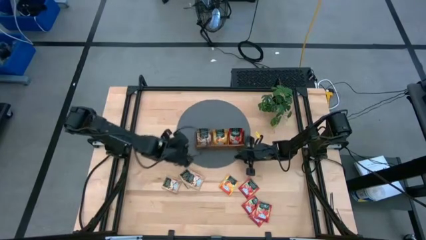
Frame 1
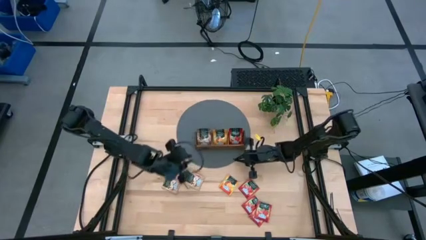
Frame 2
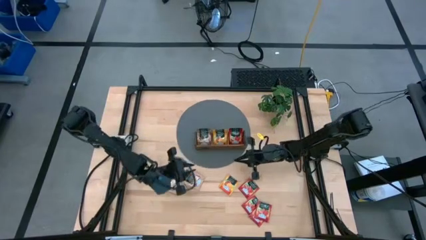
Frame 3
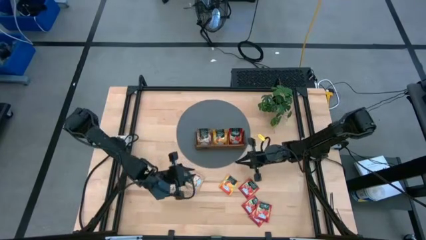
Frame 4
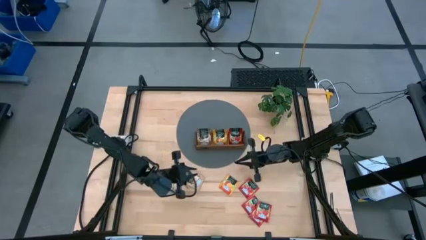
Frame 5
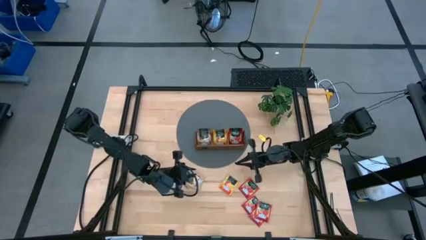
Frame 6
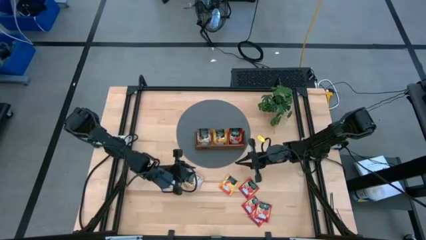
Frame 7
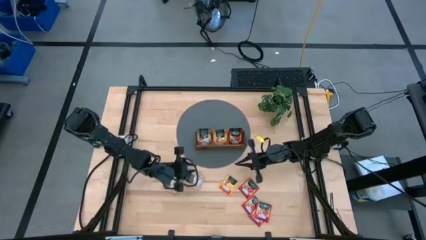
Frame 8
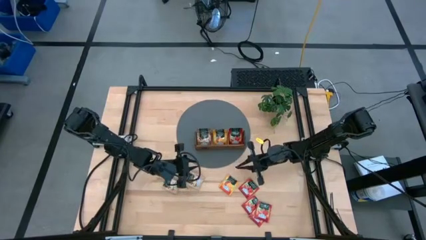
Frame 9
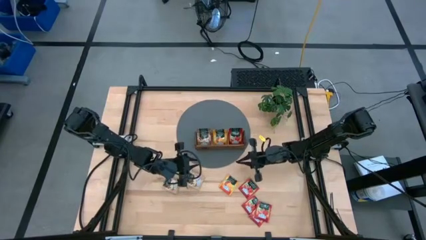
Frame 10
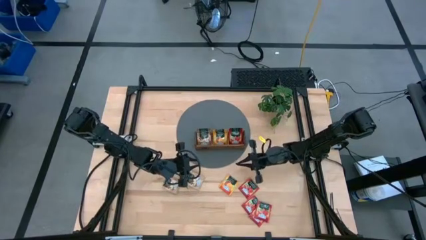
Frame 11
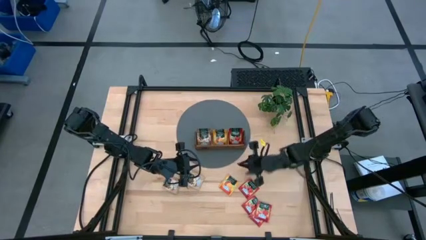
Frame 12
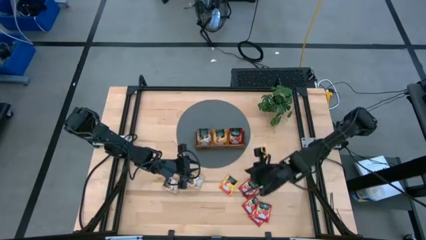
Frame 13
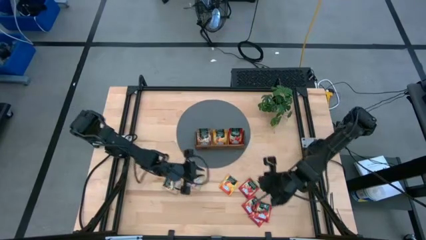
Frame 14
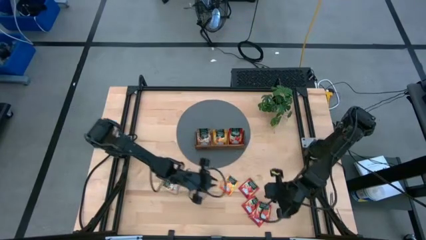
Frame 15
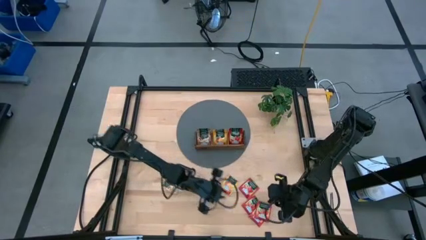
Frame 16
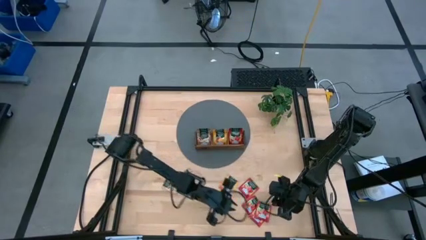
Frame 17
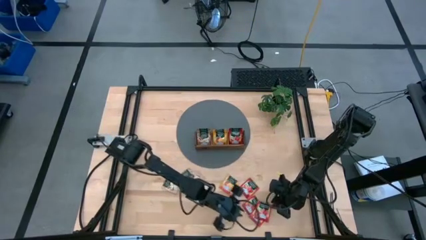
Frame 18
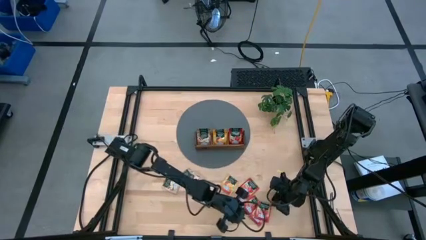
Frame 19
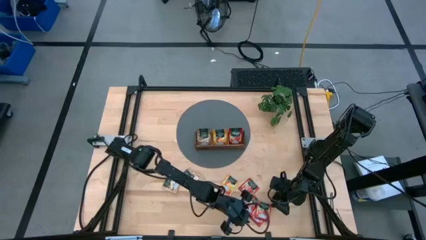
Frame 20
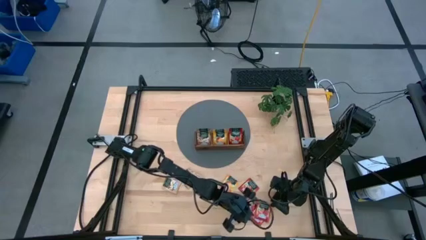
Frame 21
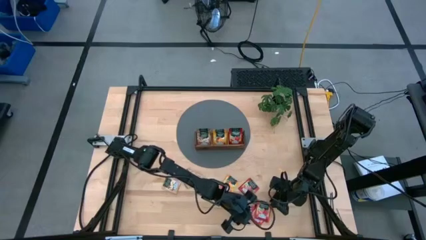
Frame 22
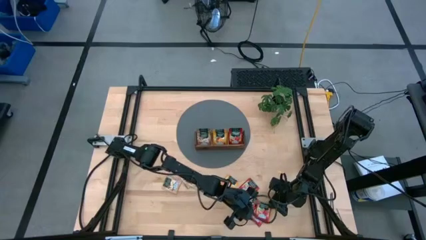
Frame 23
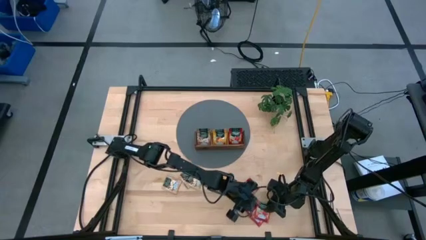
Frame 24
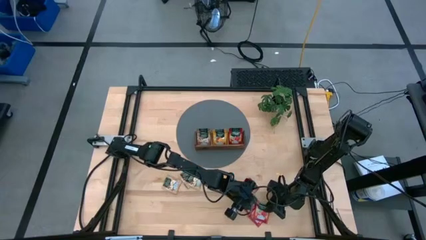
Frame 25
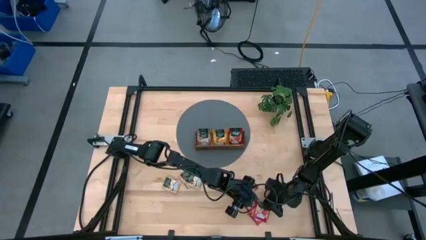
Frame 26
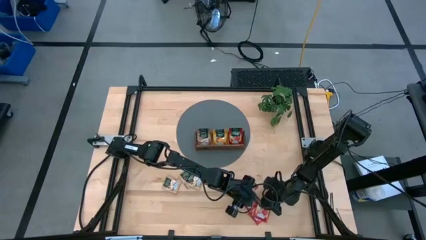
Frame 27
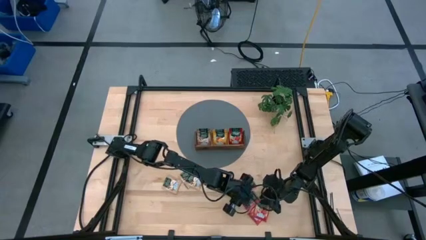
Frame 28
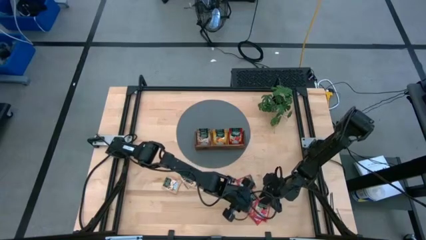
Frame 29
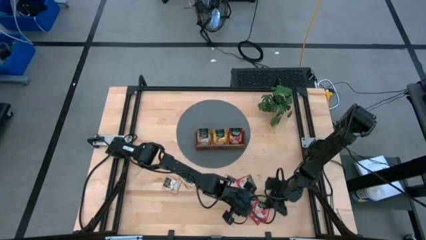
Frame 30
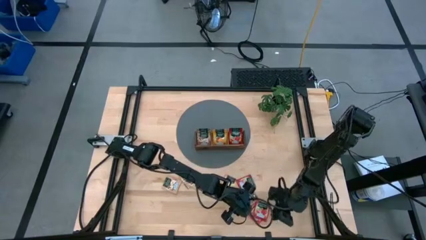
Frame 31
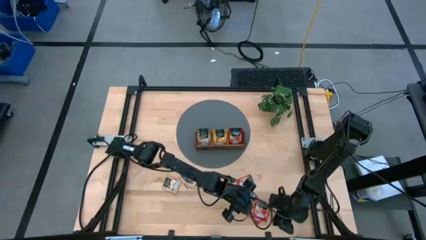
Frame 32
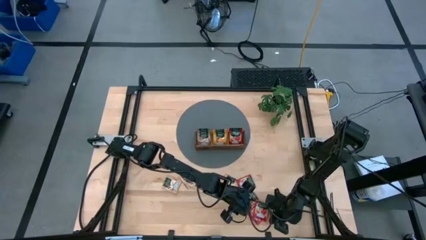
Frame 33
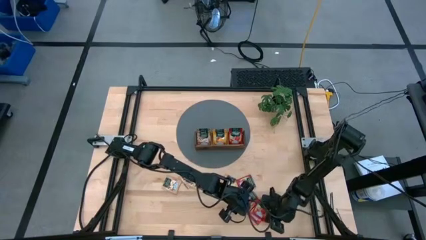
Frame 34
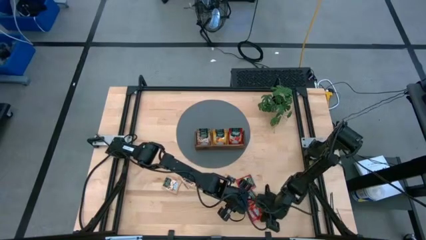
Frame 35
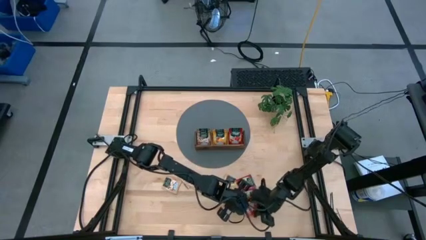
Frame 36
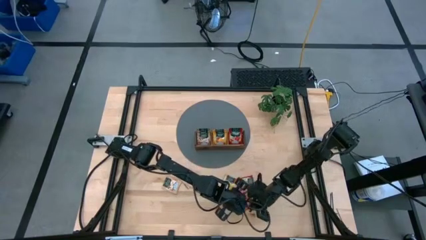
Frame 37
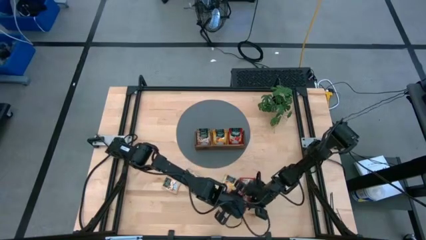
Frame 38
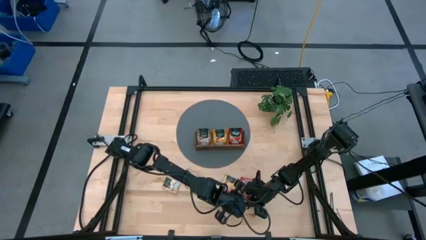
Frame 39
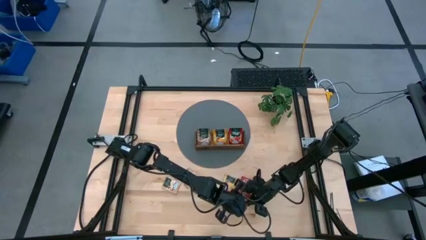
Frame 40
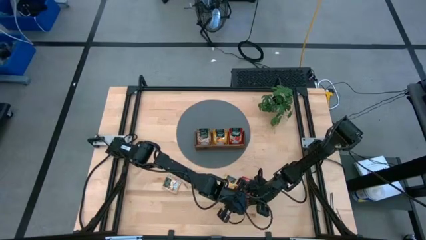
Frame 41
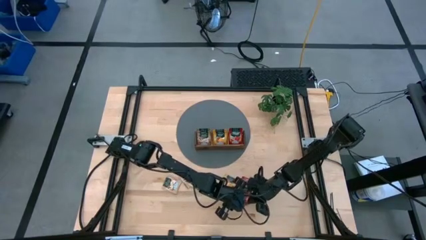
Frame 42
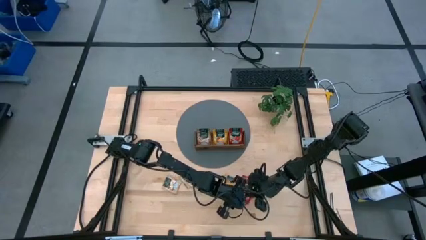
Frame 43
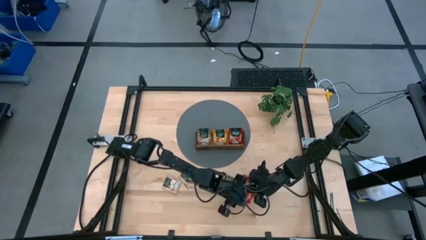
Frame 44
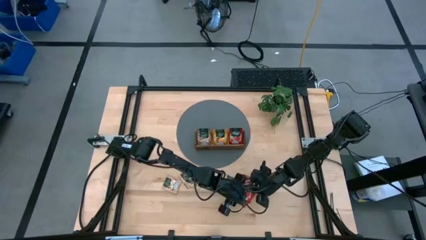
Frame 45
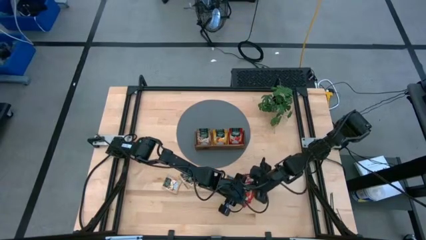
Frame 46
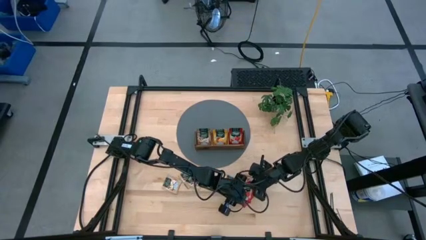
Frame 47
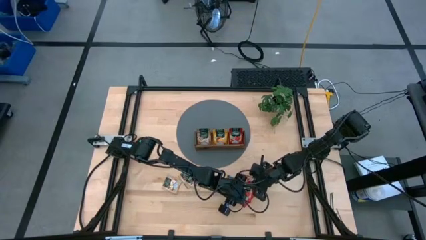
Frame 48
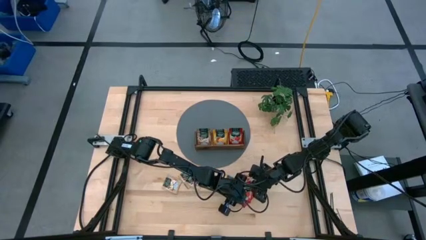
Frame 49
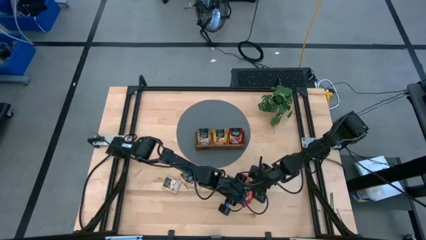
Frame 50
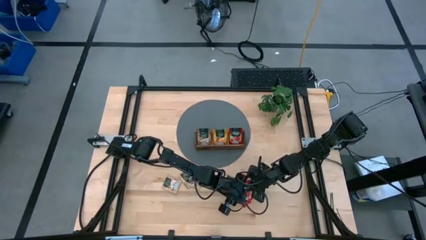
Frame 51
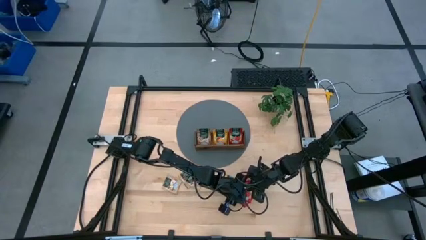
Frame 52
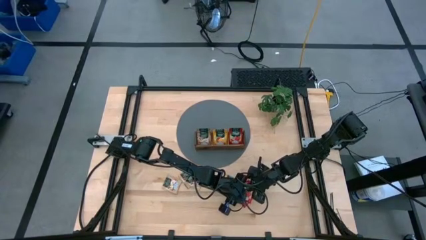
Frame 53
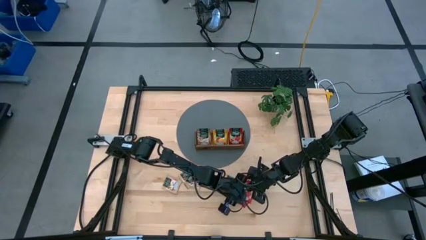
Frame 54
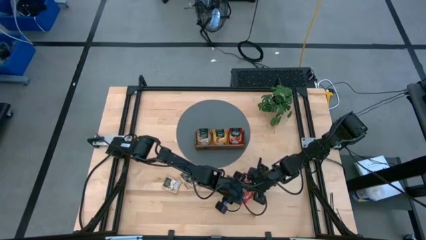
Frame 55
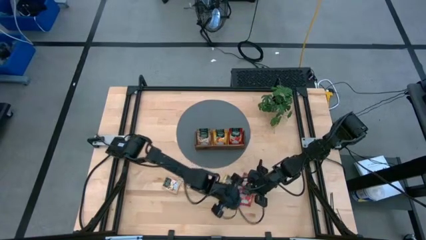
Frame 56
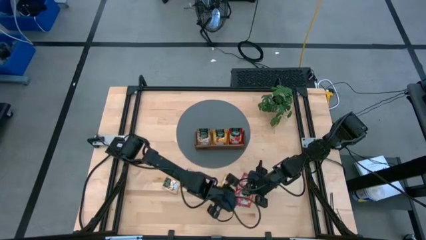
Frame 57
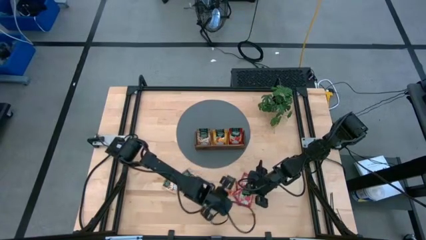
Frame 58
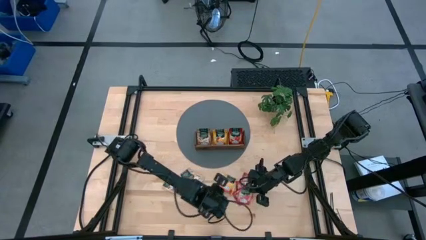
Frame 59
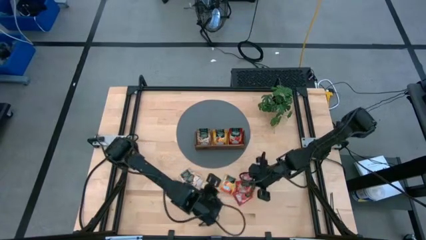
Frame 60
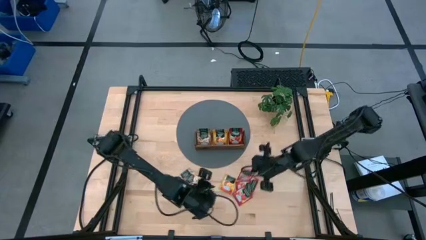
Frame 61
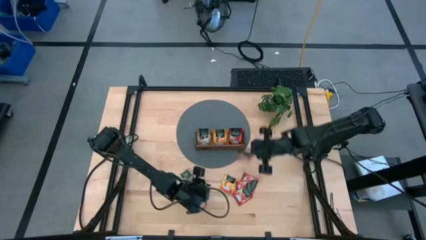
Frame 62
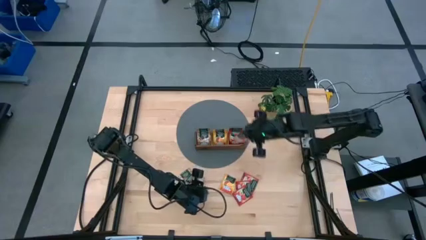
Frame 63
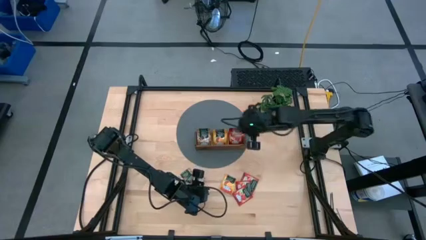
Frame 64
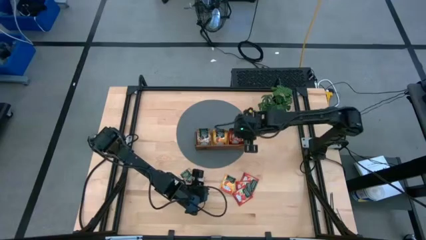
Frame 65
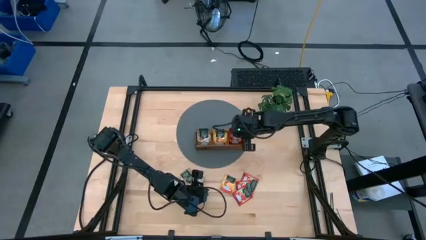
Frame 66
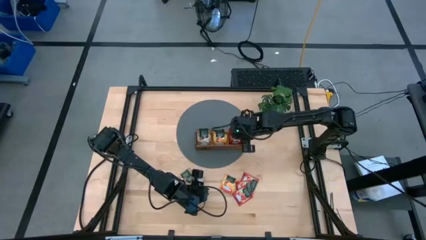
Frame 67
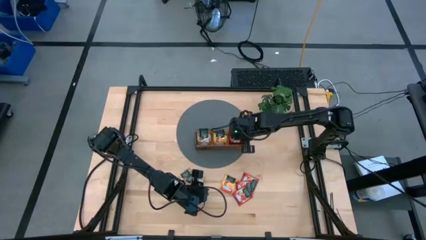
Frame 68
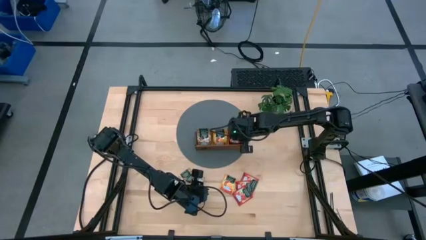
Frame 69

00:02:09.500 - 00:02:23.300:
Task: Pick & Place Tea
Put the red tea bag into the right section of the wooden organizer
